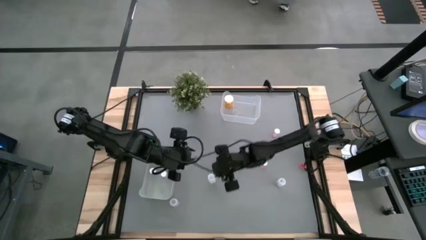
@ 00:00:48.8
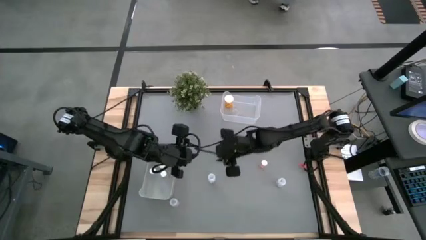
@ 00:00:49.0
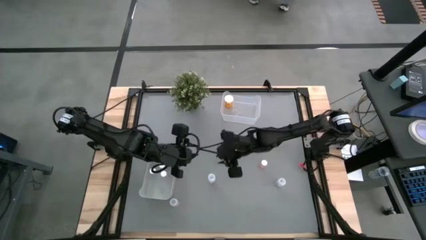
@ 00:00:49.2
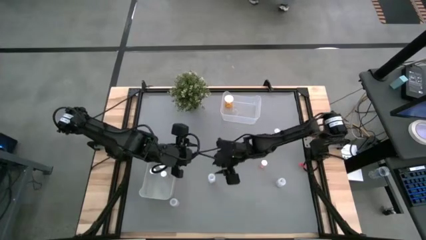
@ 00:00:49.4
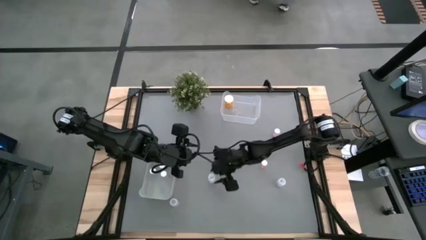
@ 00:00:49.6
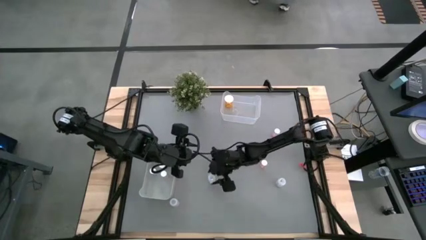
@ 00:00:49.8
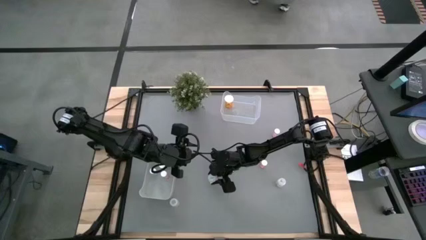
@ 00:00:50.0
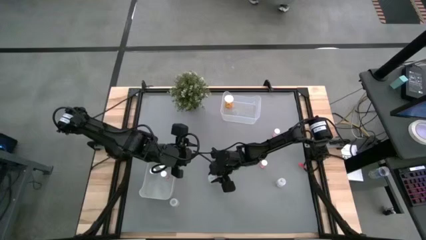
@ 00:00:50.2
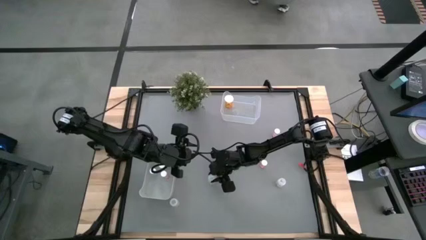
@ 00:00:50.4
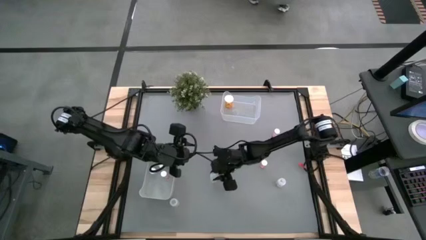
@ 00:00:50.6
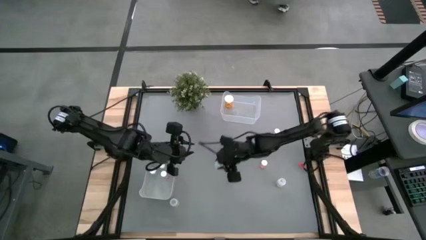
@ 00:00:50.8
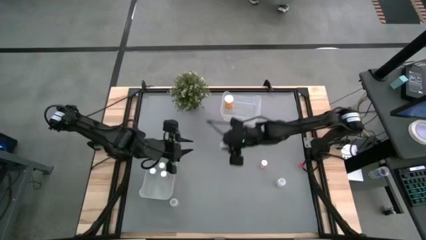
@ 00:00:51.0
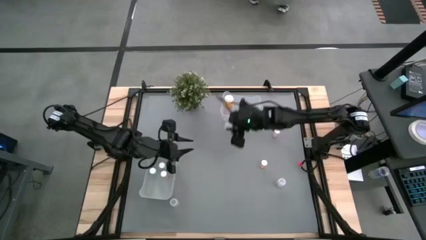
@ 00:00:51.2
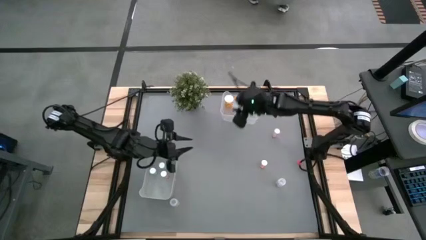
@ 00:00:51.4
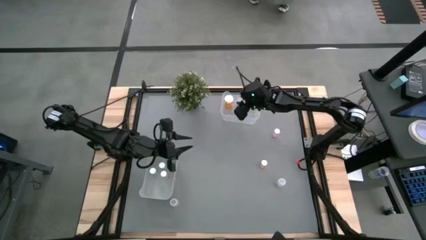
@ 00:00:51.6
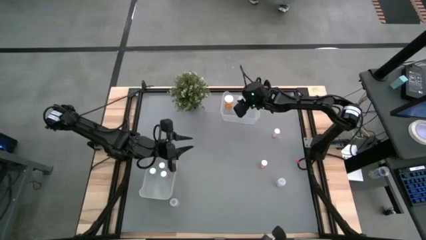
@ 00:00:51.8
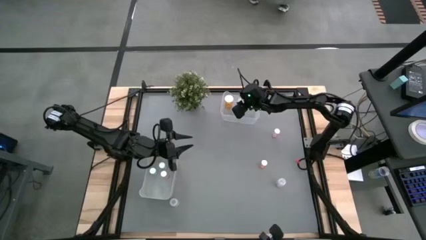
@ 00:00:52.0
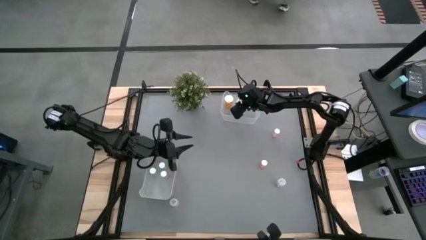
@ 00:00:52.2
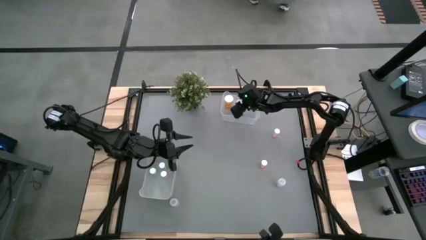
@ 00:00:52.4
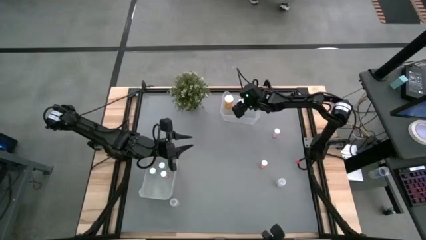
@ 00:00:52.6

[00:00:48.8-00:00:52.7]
Task: Pick and place medicine bottles into bin by pill shape (circle, oval)
Put the middle white capsule bottle into the transparent bin

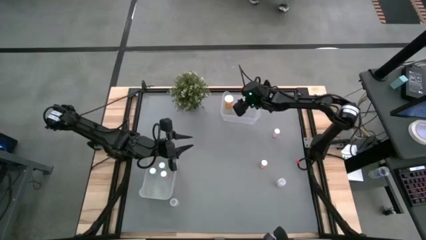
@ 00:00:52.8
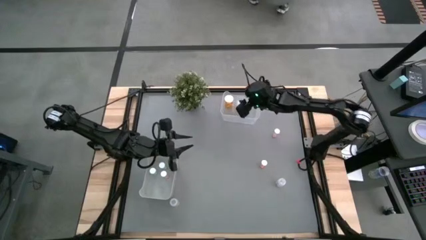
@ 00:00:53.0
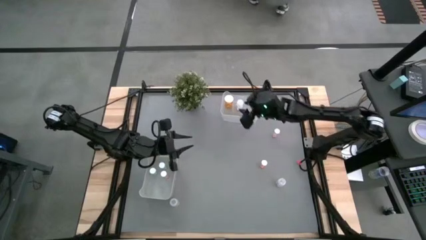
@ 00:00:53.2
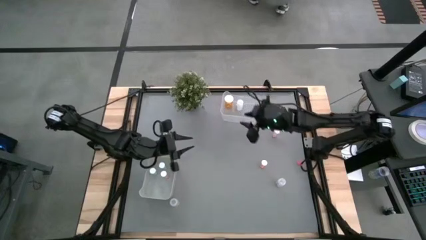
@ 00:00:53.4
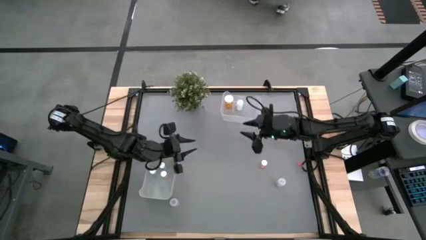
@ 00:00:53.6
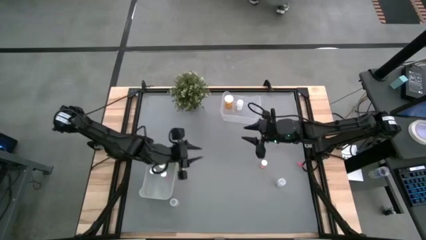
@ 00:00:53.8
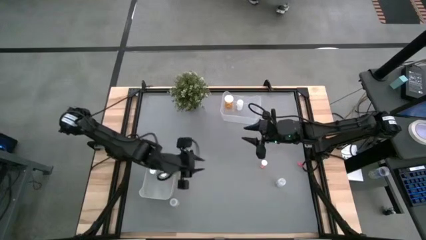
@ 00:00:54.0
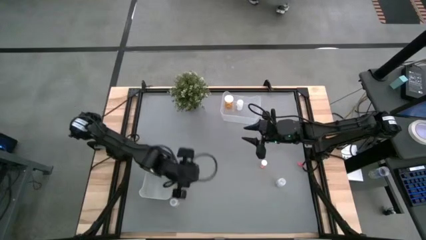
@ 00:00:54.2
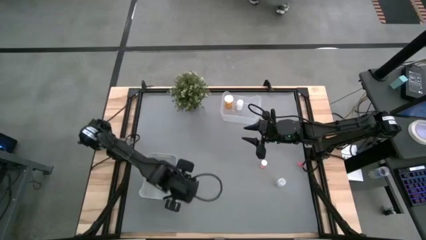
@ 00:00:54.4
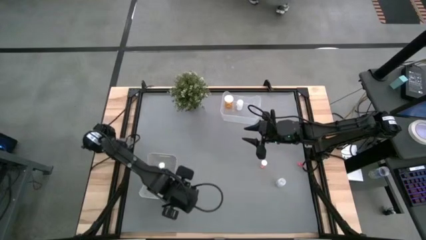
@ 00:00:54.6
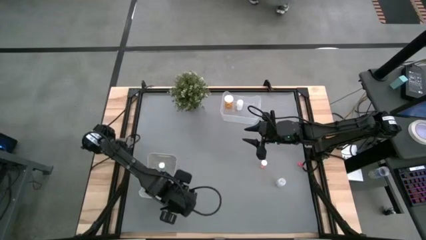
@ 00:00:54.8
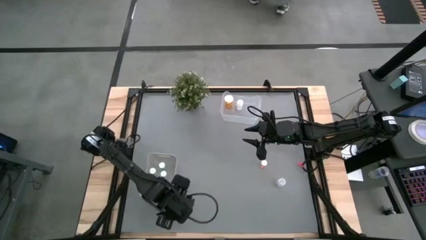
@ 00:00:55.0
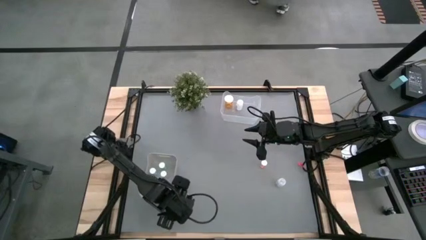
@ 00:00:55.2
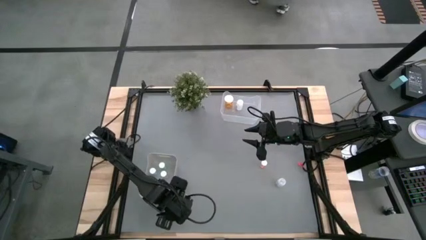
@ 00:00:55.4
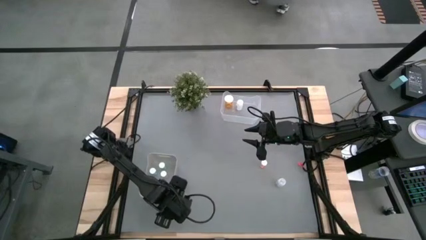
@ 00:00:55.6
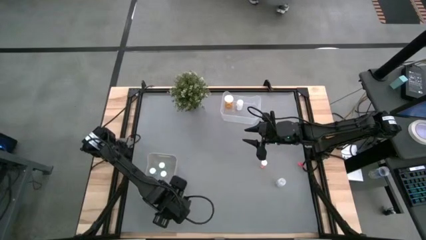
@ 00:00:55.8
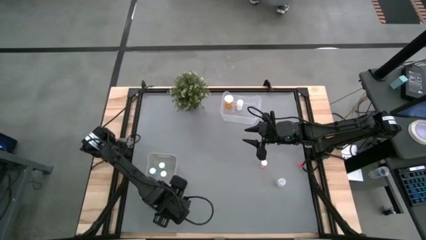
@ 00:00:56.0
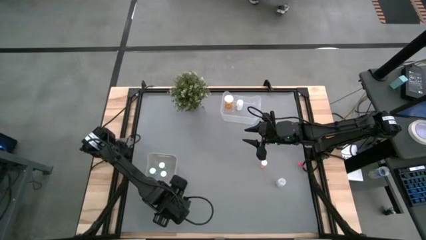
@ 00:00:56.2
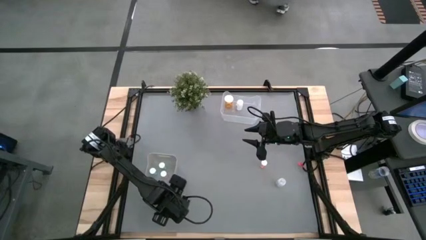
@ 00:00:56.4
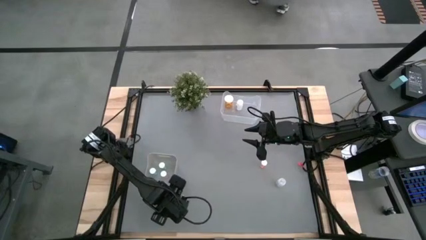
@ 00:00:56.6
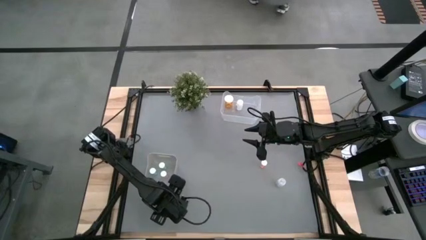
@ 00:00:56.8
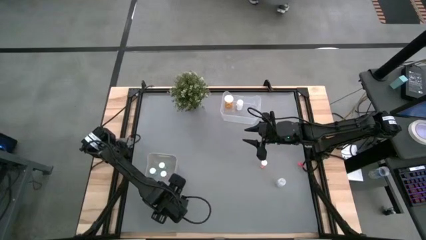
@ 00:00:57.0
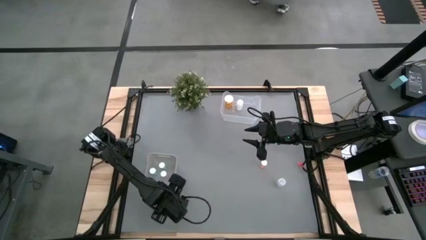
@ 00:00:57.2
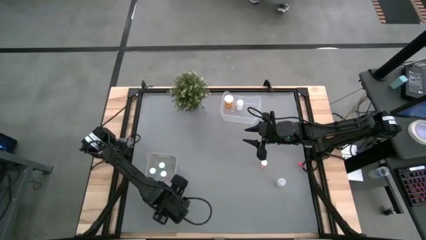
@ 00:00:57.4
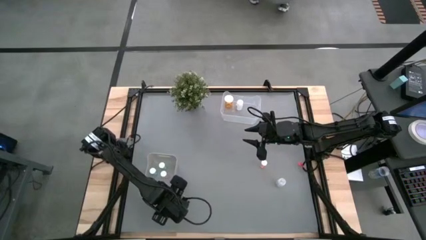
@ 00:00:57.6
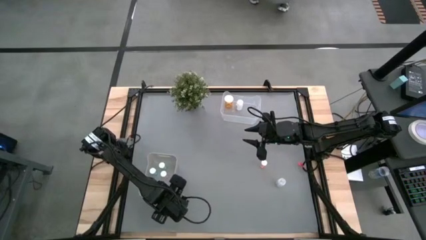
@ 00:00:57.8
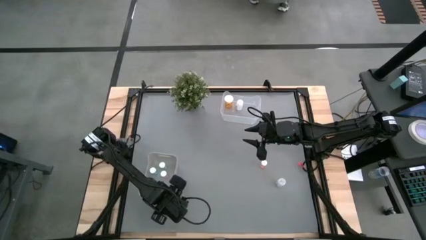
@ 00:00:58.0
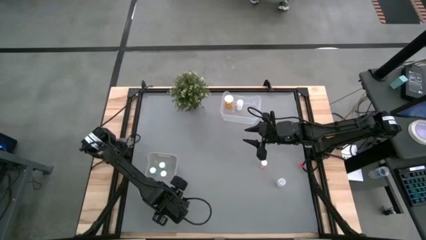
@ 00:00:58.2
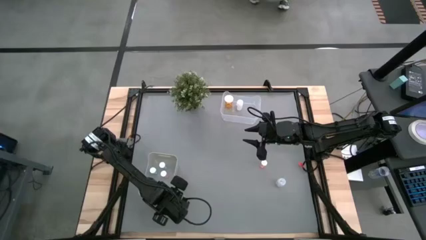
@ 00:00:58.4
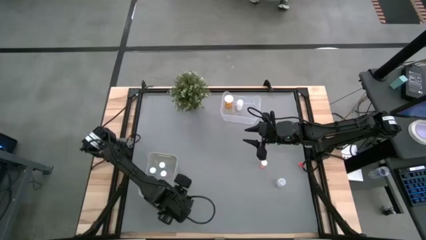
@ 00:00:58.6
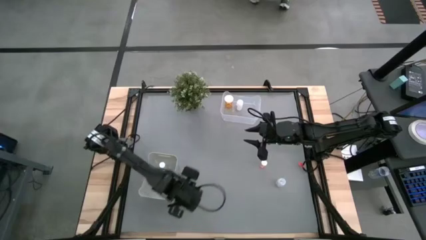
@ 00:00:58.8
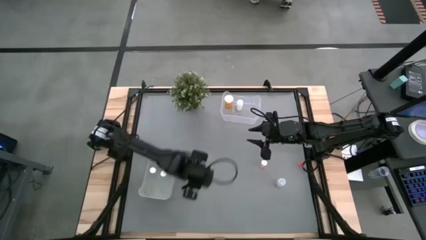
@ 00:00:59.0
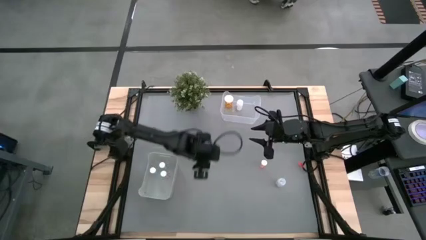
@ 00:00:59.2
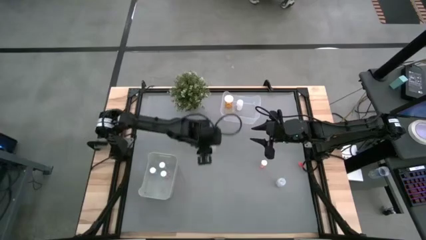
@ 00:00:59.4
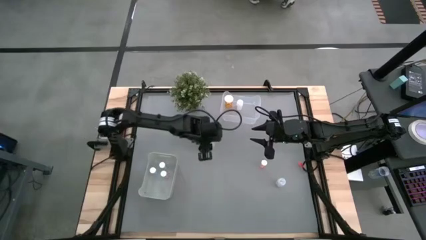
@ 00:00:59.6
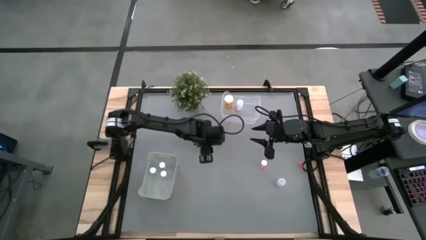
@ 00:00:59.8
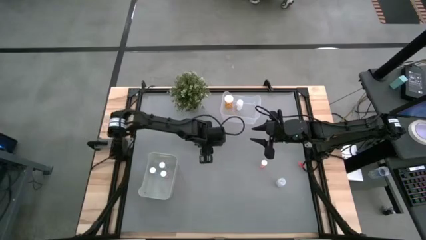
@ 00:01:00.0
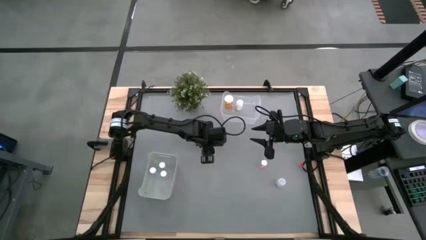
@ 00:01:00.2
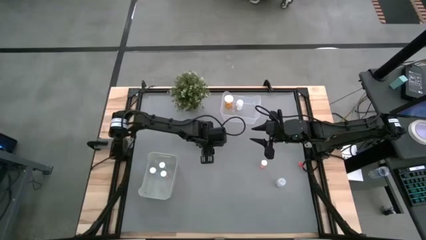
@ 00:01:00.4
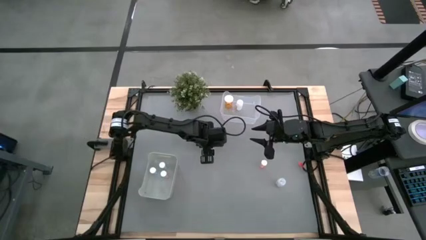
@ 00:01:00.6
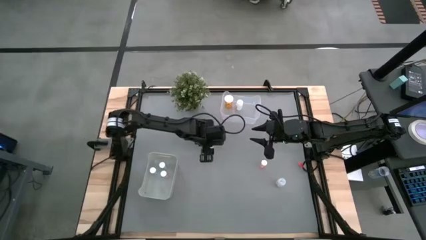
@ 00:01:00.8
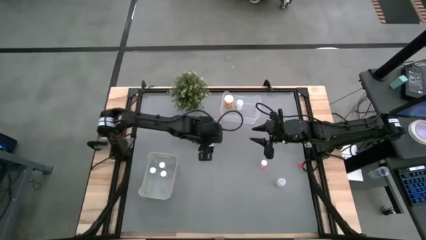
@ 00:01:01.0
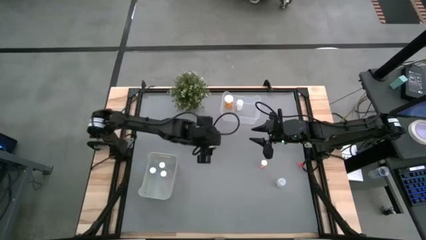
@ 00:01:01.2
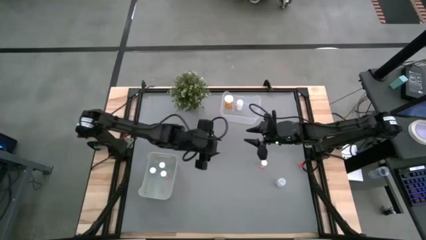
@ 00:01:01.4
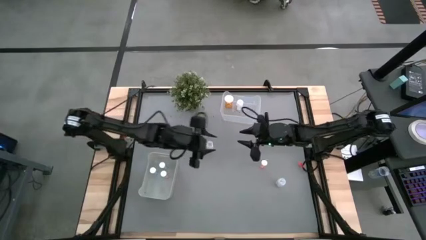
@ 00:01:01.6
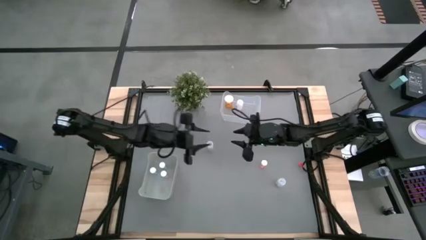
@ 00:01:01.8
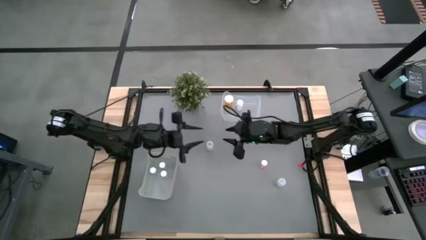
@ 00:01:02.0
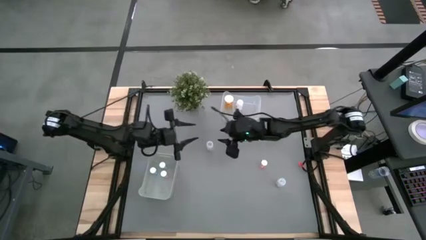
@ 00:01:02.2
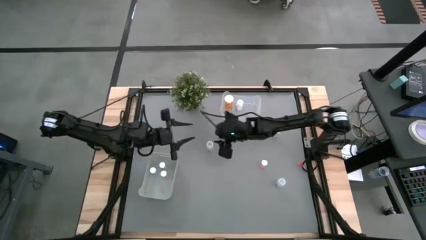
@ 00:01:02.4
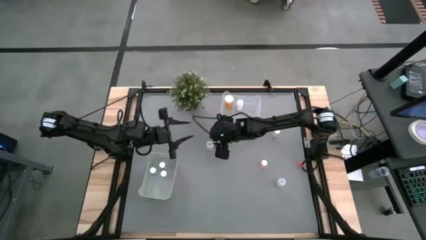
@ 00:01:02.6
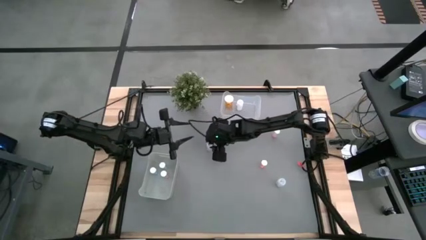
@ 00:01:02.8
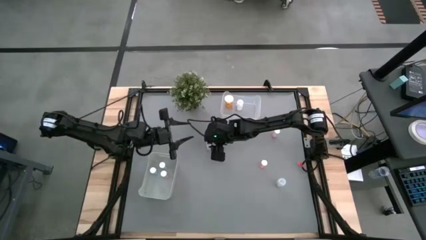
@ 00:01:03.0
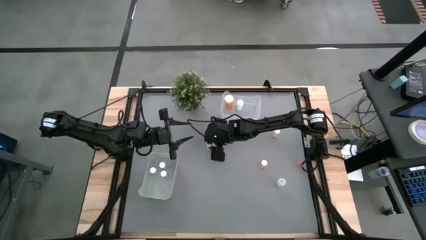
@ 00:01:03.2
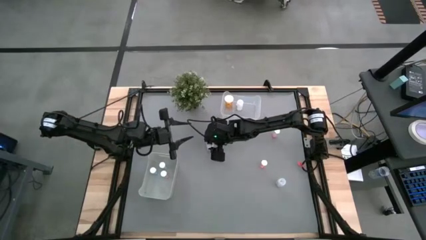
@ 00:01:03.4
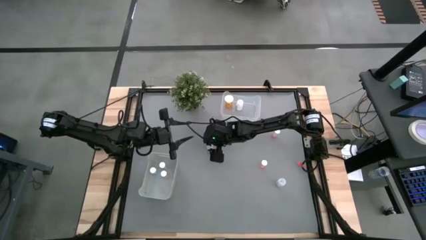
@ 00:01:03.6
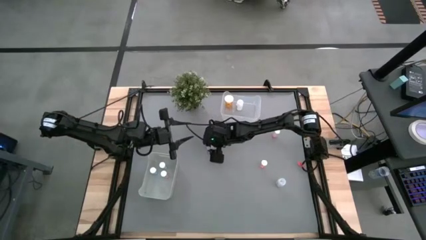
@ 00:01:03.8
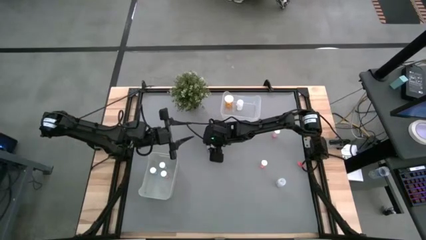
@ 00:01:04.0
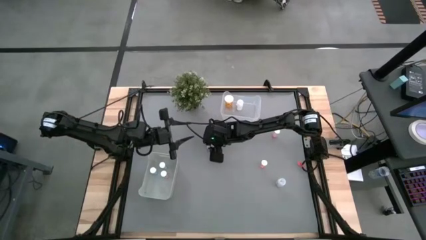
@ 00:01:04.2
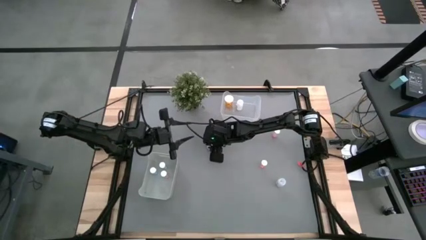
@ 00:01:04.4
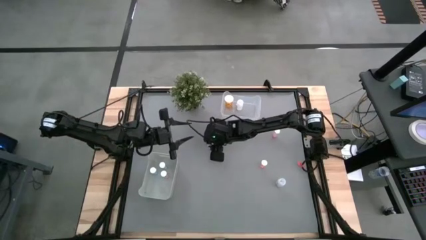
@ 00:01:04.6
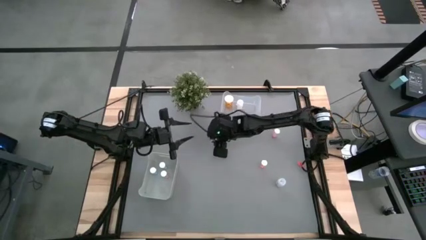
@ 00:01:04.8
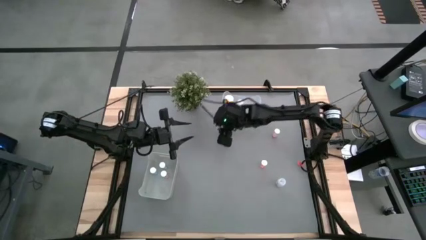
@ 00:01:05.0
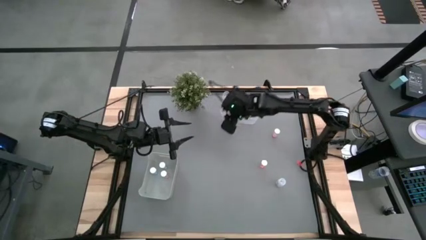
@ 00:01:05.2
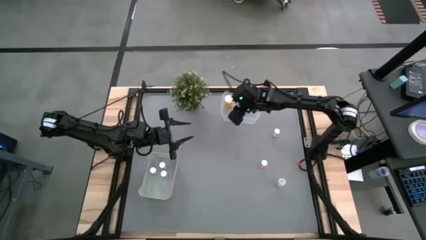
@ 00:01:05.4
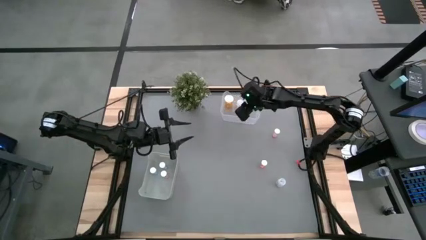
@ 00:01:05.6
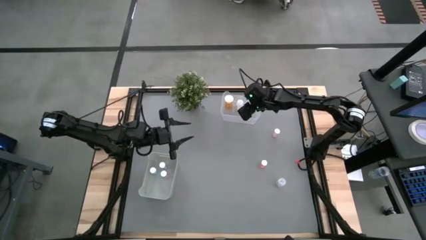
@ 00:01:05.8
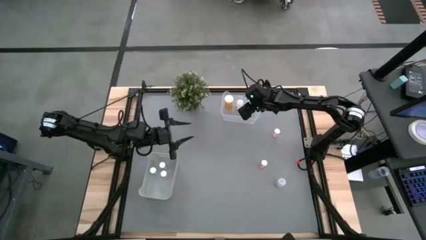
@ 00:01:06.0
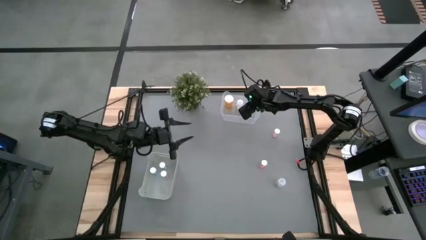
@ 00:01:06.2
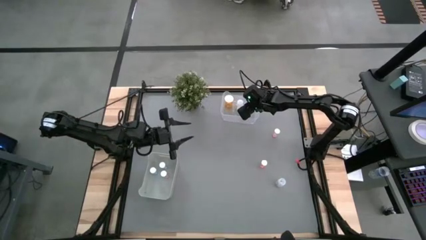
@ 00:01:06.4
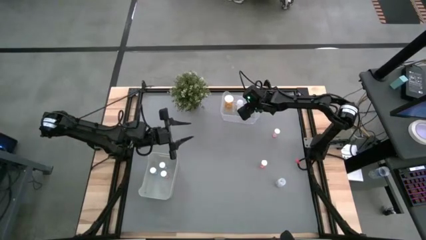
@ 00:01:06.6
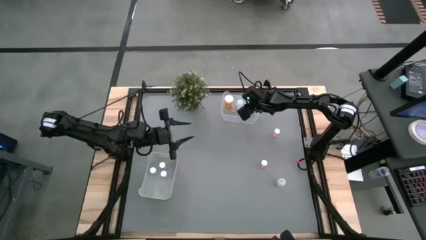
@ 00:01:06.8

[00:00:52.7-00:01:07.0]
Put the left white capsule bottle into the transparent bin
